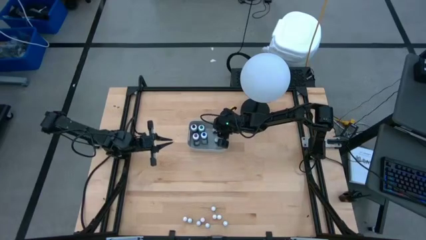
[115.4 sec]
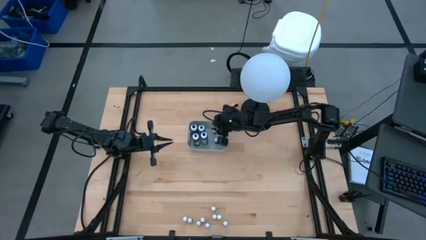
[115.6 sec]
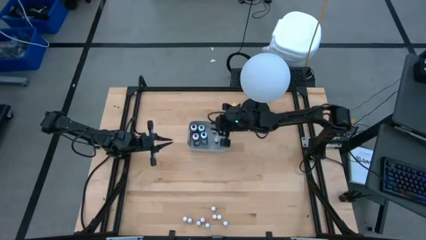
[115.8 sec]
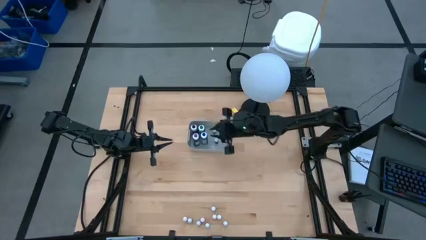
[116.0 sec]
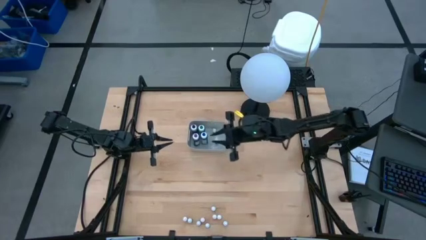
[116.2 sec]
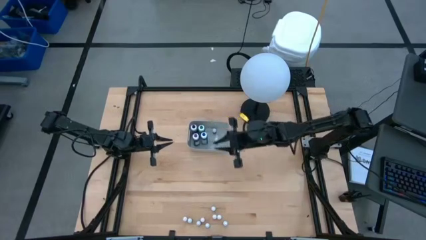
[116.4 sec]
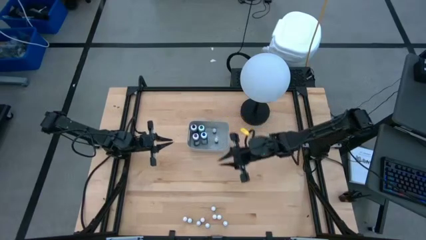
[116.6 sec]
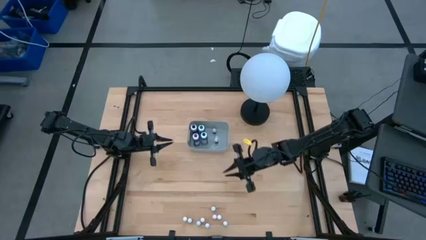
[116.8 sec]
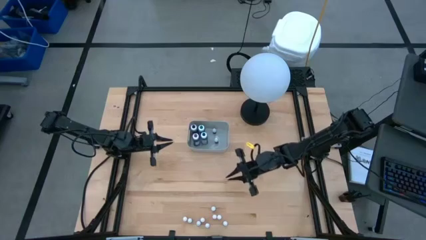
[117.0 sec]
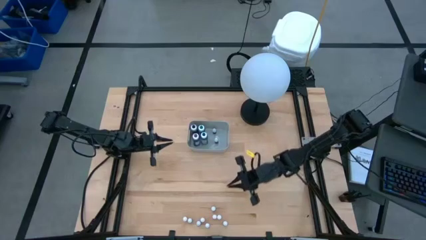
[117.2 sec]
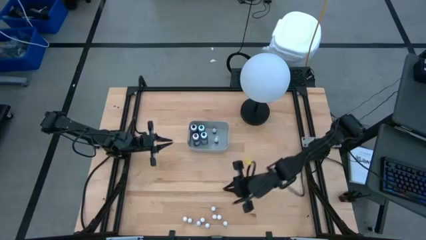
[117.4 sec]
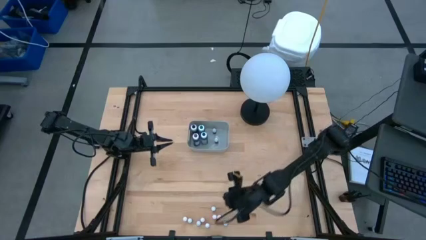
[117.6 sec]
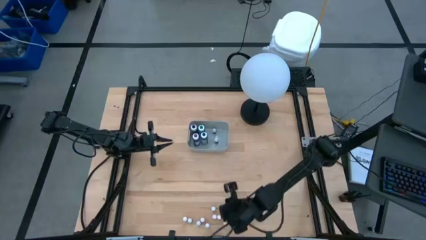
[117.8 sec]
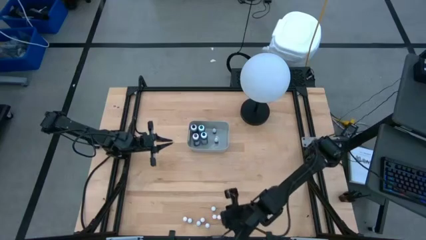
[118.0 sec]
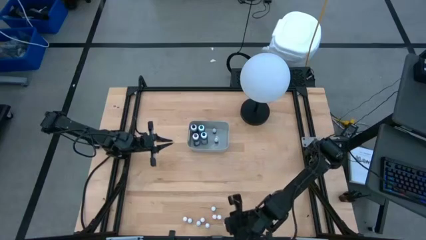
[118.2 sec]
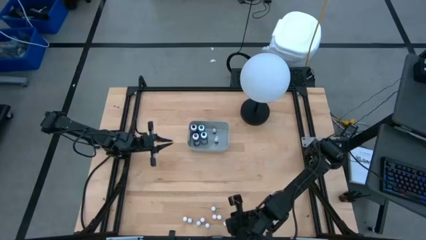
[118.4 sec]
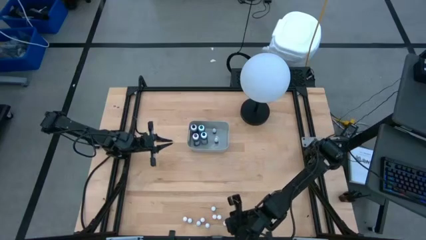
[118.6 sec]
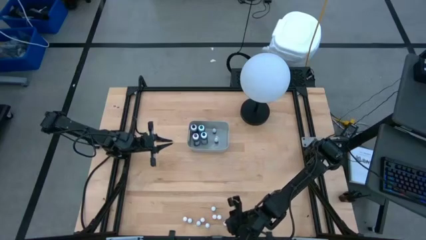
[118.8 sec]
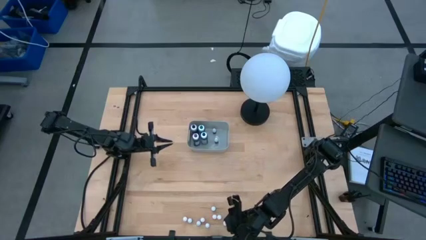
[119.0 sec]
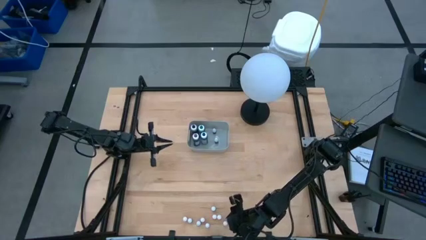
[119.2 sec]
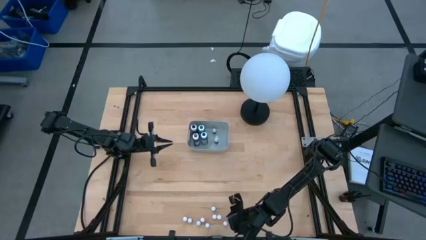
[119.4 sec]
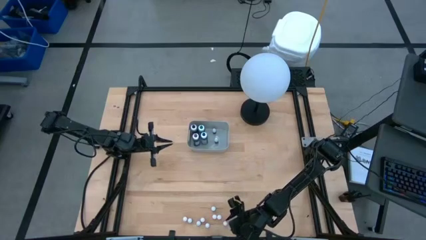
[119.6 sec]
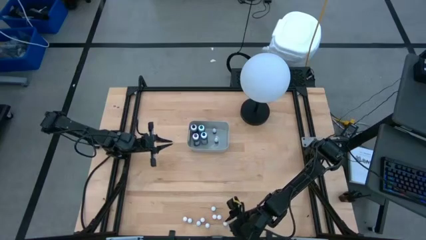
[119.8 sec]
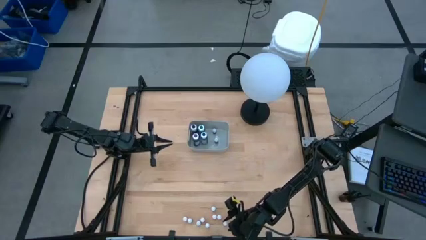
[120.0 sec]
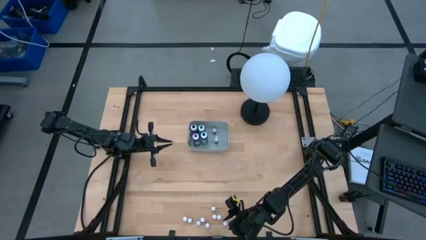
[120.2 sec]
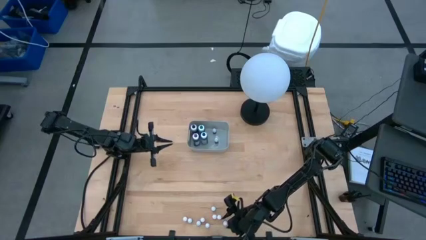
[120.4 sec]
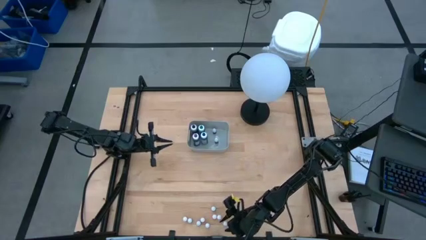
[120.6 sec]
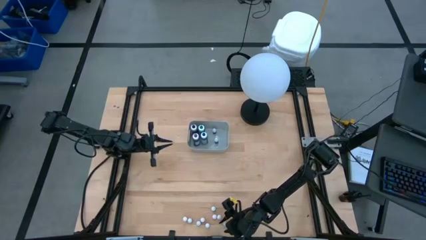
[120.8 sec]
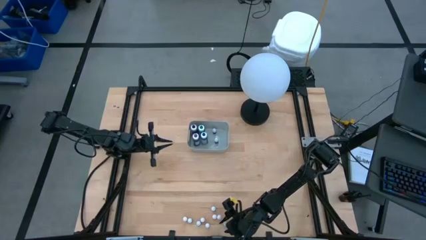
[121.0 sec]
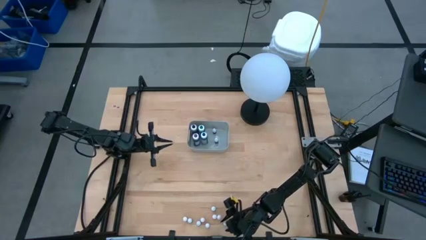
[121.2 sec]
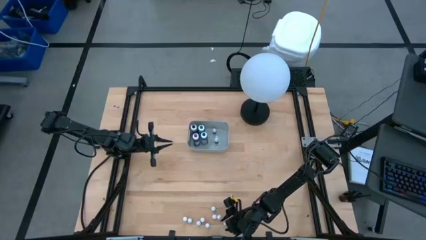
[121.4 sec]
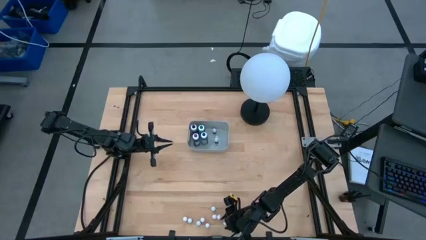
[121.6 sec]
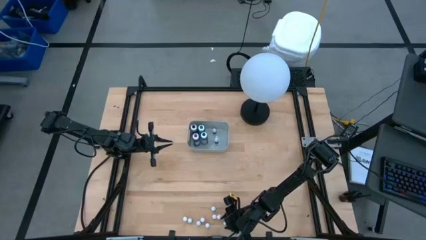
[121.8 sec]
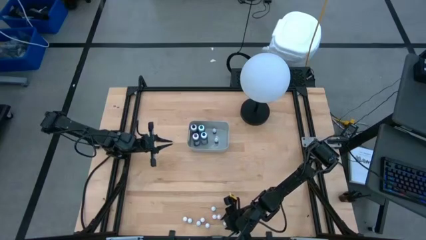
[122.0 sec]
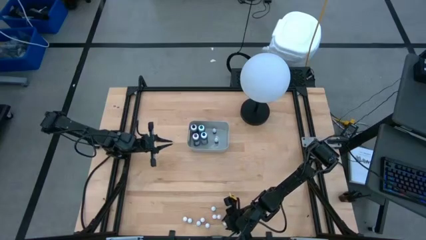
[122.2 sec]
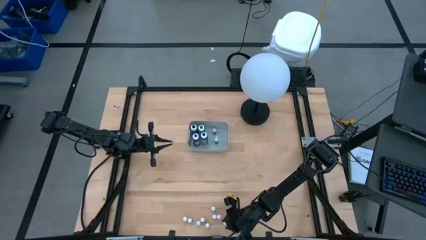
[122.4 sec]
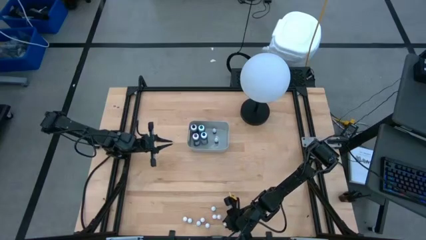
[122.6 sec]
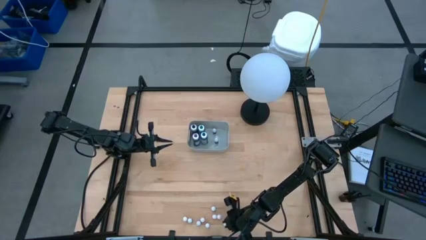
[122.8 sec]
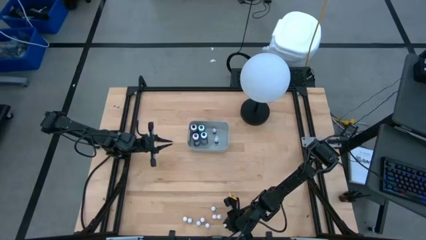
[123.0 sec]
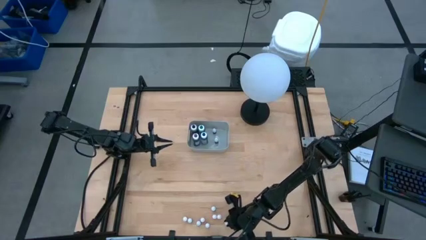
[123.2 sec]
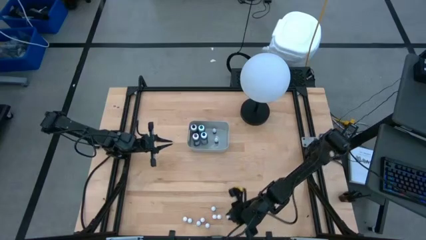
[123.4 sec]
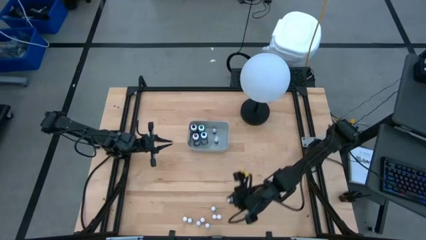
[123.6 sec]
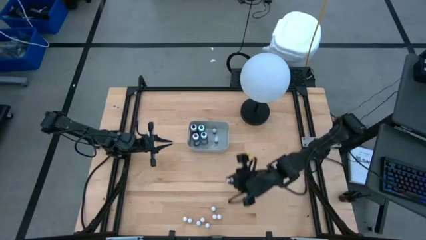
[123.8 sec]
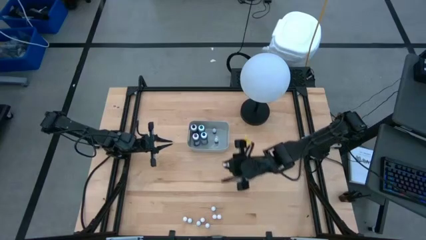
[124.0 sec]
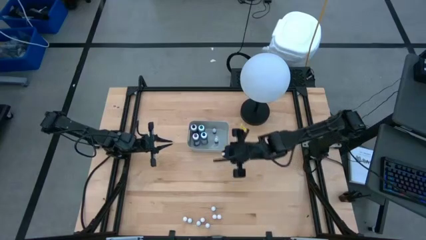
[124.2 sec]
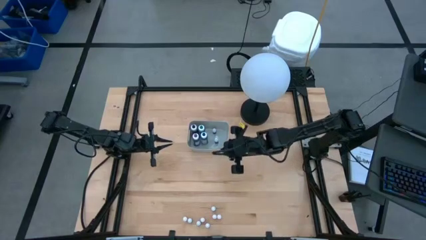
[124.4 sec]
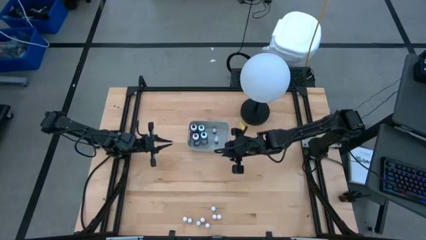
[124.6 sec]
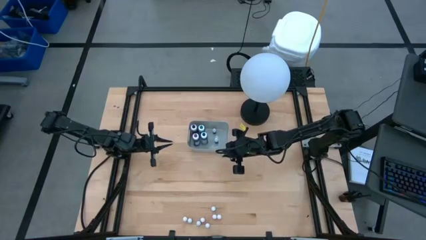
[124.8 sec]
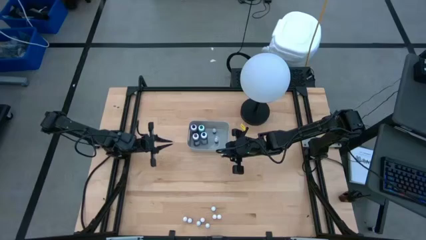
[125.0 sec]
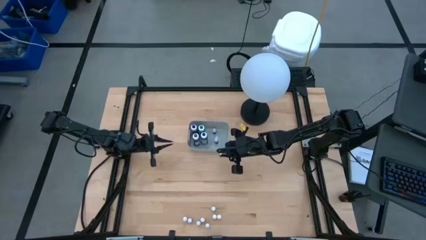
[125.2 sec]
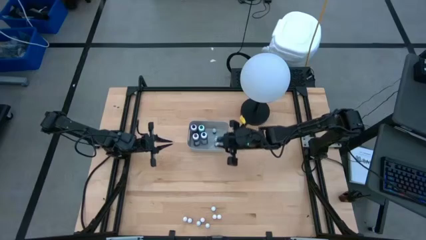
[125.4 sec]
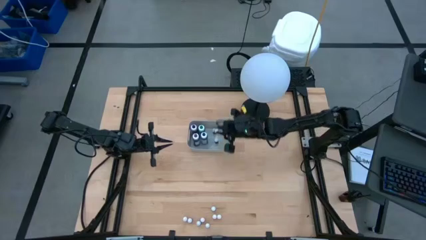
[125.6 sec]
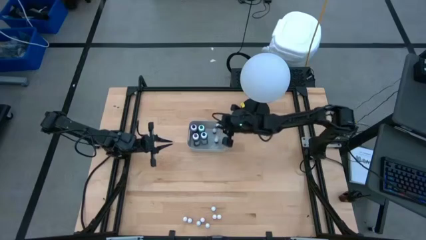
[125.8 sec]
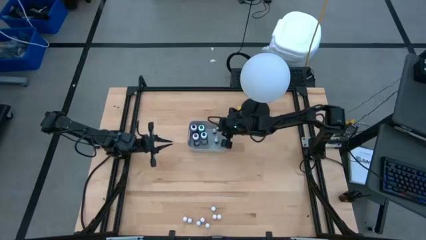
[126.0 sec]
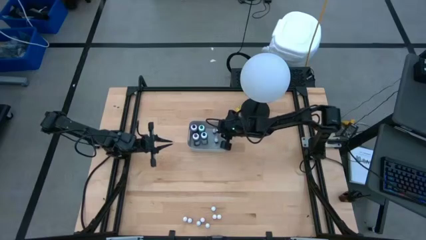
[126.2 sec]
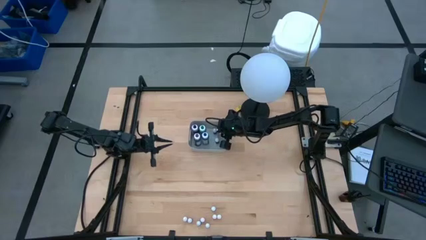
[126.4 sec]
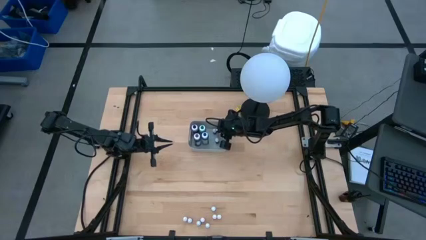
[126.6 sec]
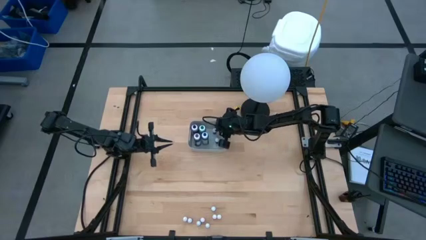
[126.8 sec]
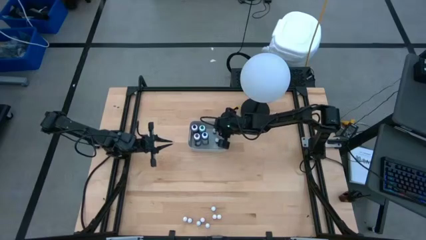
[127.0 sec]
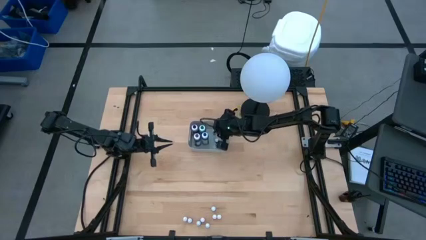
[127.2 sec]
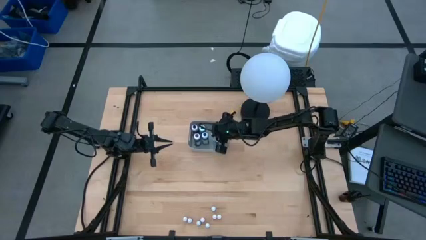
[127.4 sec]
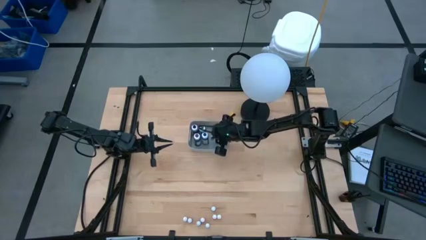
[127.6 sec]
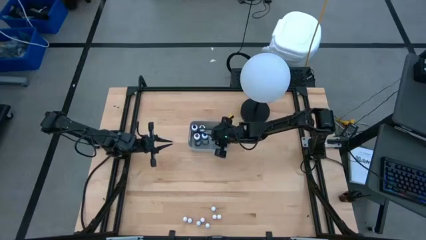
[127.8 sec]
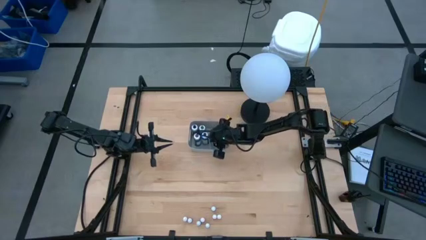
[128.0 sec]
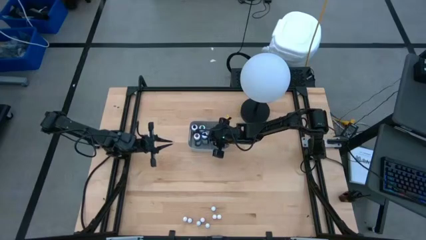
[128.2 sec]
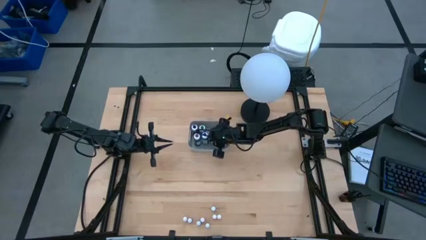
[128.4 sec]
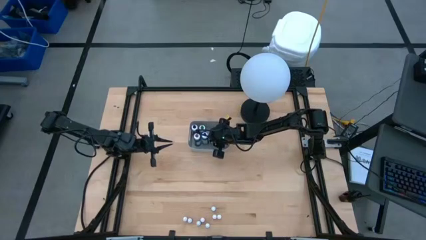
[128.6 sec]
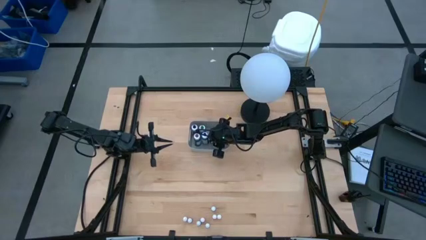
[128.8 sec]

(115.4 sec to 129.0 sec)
Task: Pick & Place food coloring
Put the small red food coloring bottle into the gray bin
